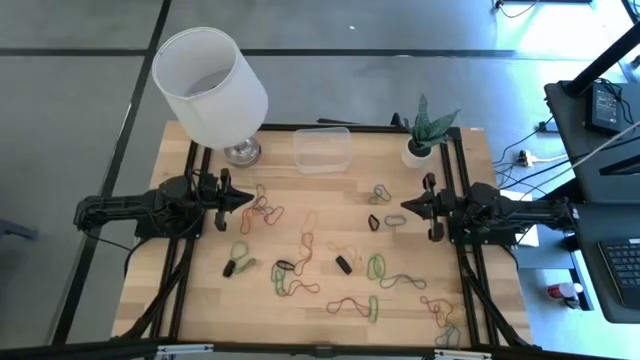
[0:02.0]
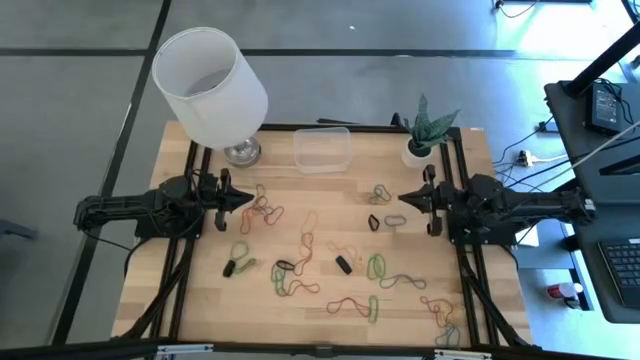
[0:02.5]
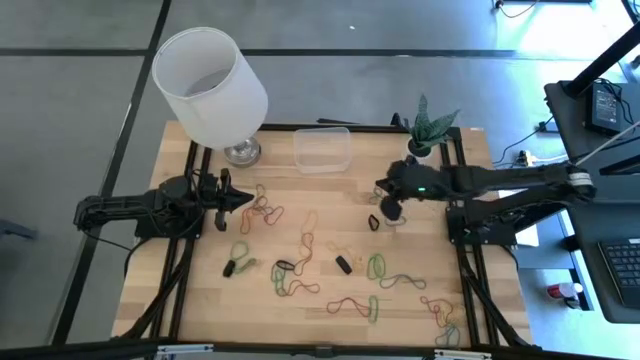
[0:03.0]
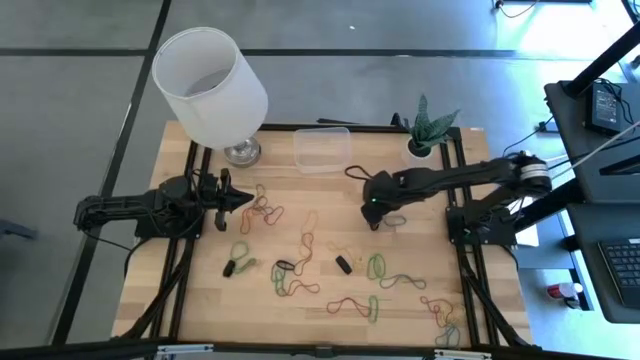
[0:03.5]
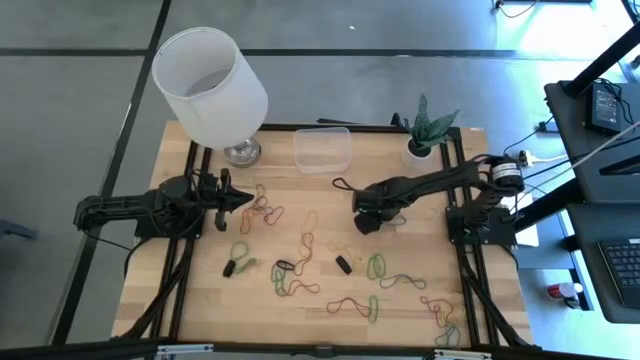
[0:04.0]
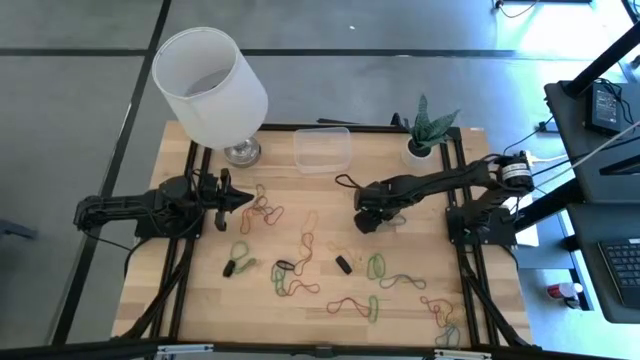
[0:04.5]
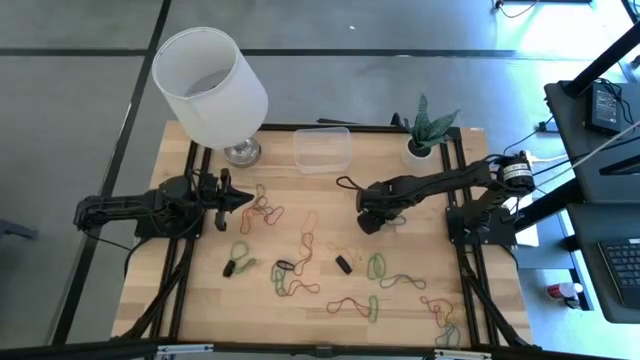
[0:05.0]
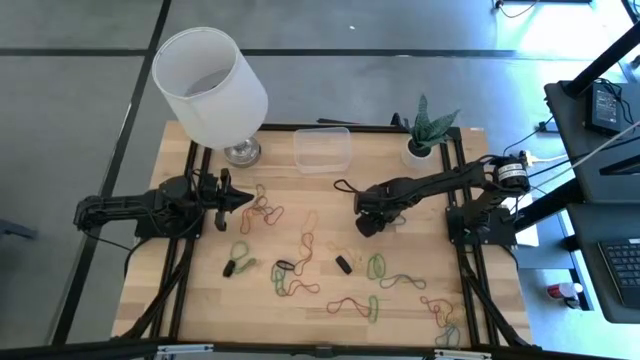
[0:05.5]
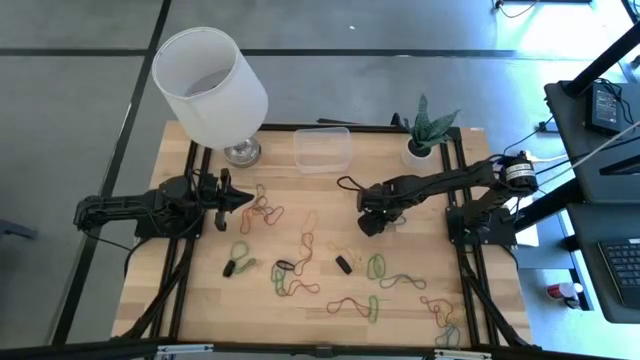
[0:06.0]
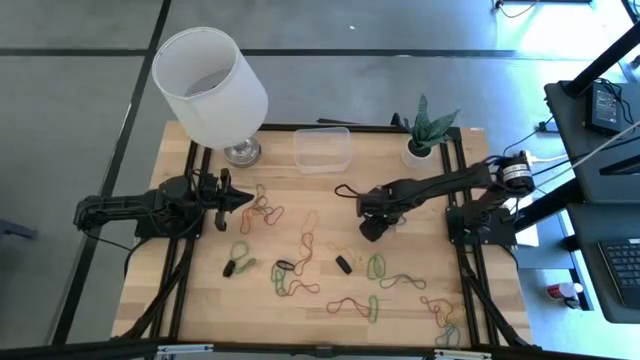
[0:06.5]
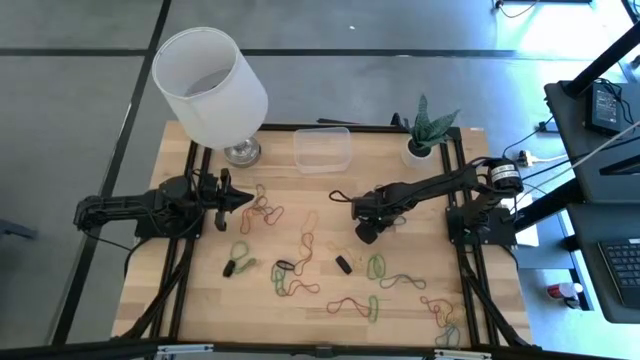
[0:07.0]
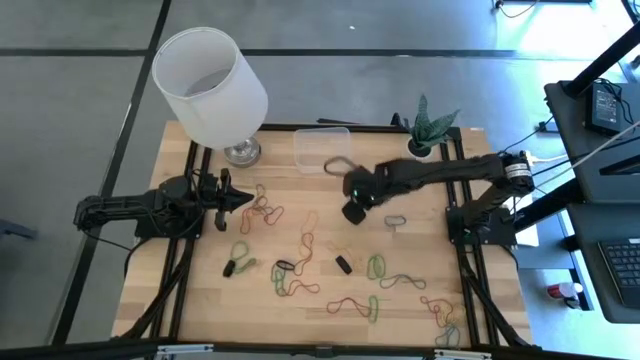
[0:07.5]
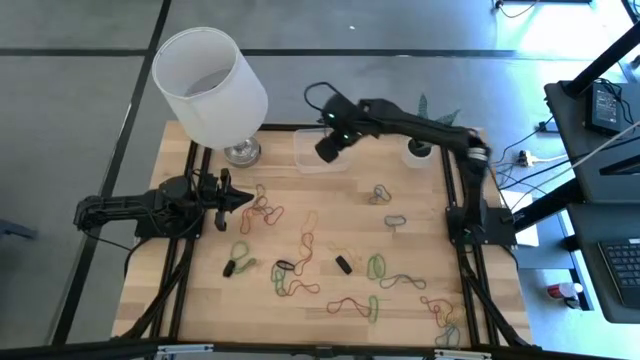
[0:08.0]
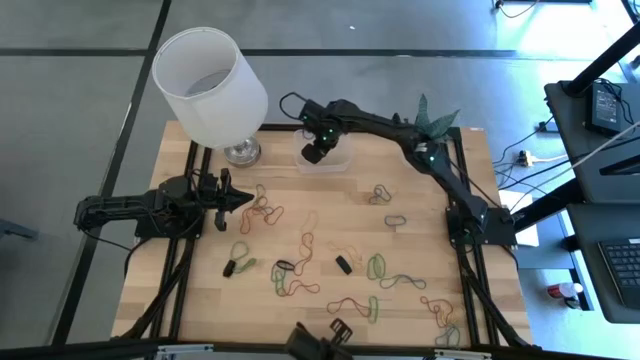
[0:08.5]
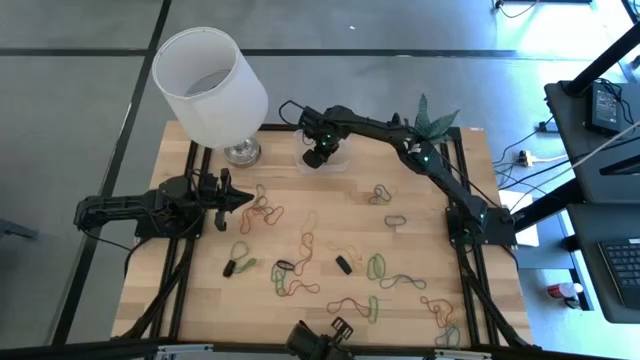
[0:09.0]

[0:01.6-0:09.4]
Task: Pick and place rubber bands into bin
Put the black rubber band into the transparent bin

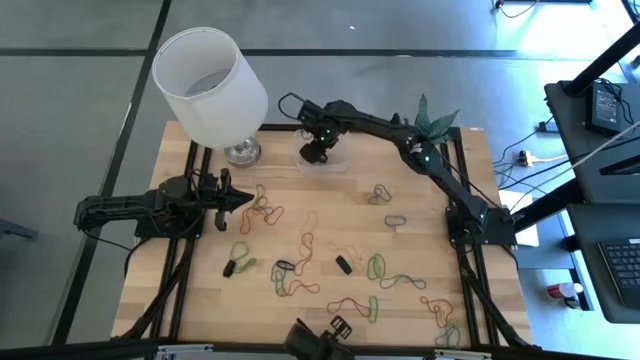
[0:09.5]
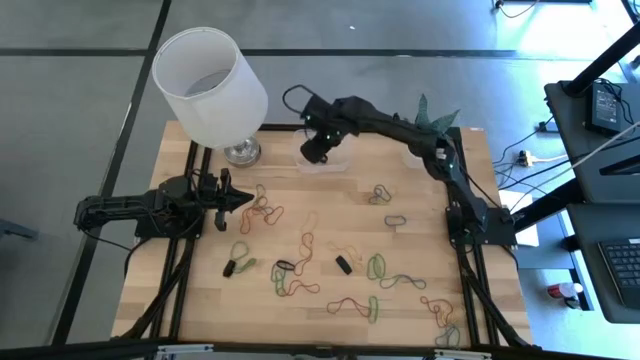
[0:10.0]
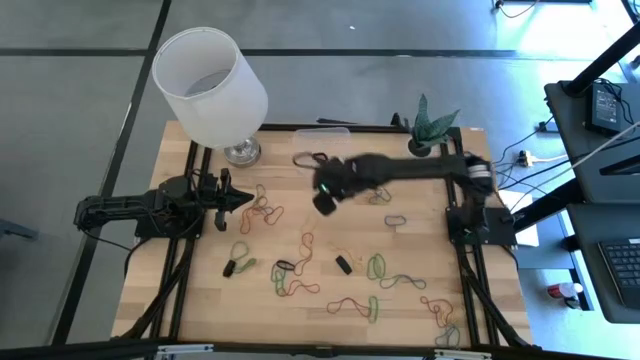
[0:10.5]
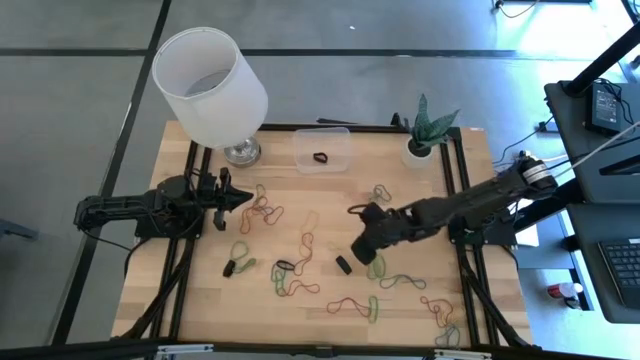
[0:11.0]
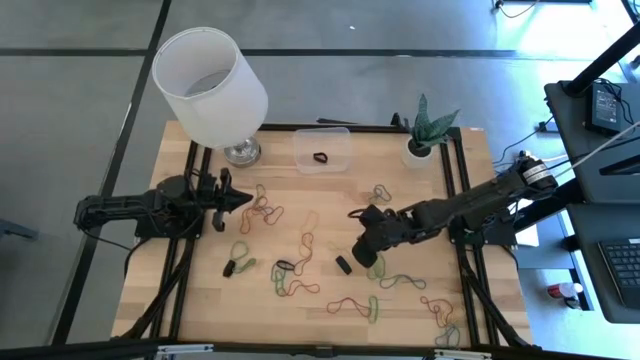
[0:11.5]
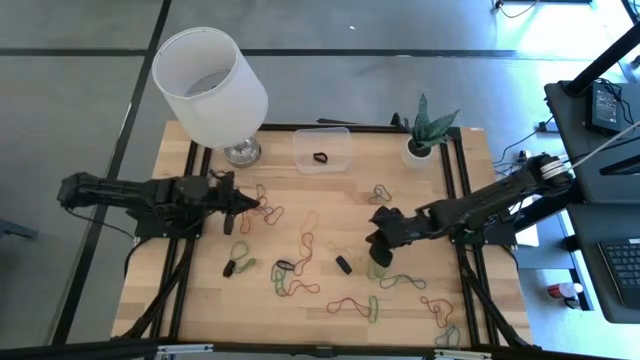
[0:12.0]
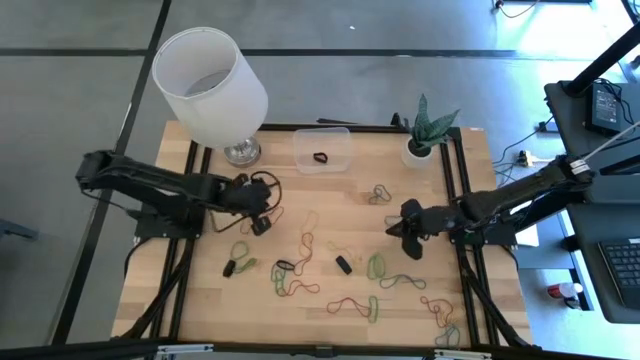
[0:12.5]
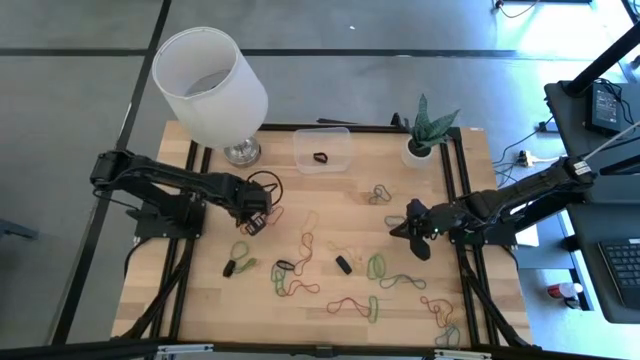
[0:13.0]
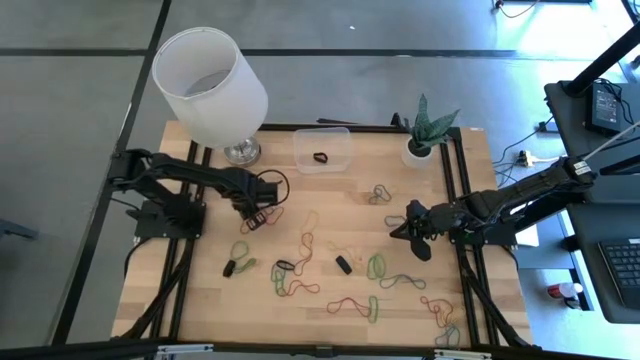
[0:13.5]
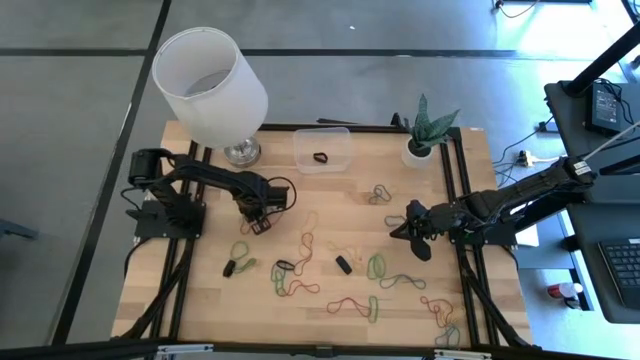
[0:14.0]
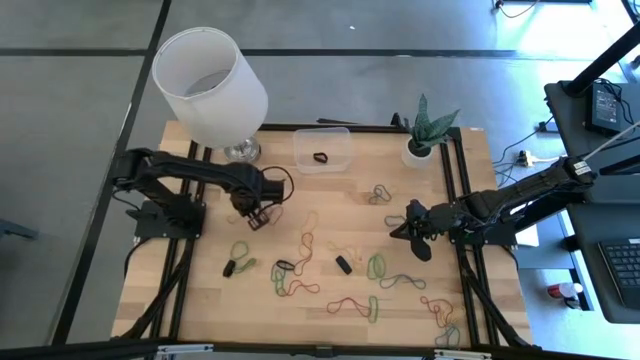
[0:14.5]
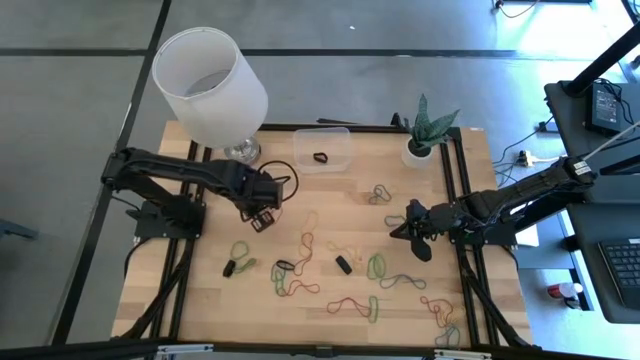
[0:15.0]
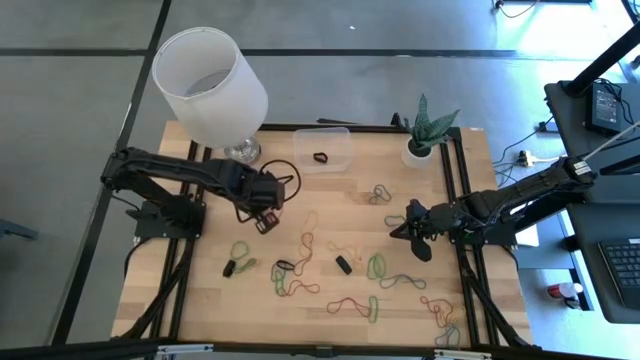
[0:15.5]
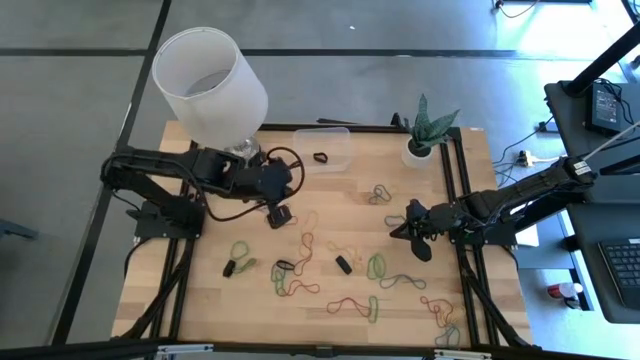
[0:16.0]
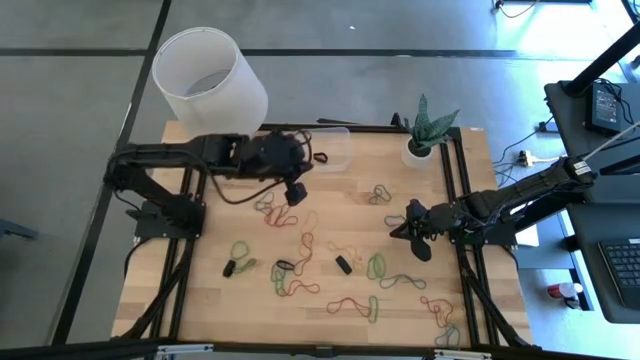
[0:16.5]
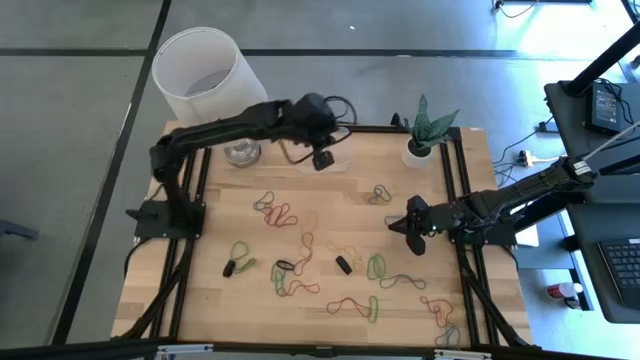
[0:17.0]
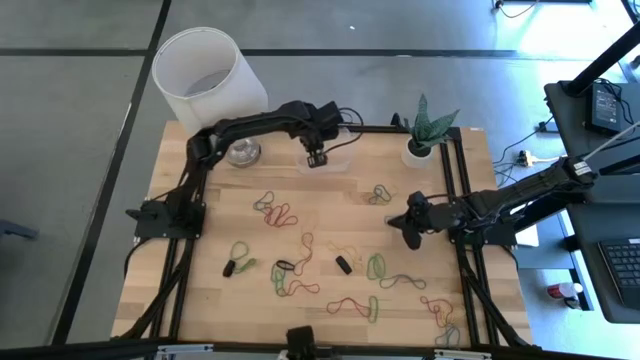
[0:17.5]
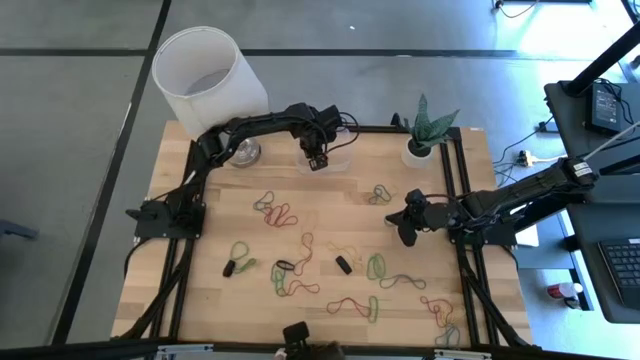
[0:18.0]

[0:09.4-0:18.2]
Put the yellow rubber band into the transparent bin

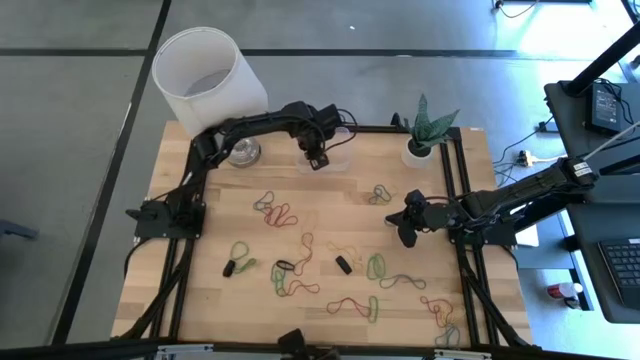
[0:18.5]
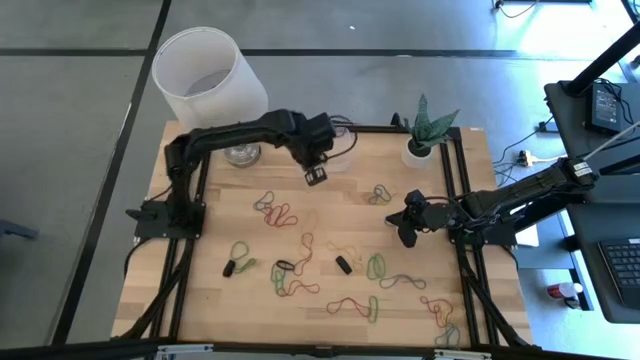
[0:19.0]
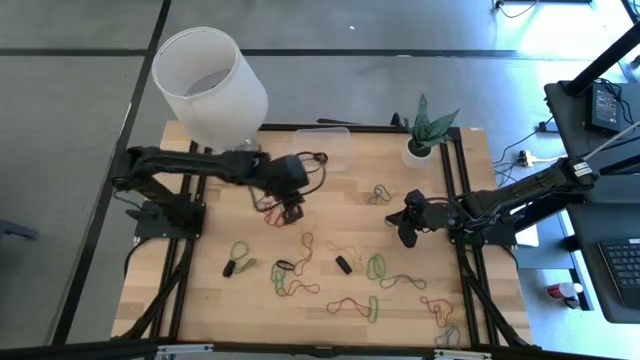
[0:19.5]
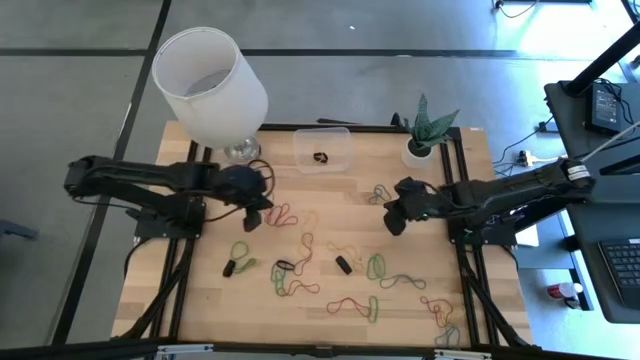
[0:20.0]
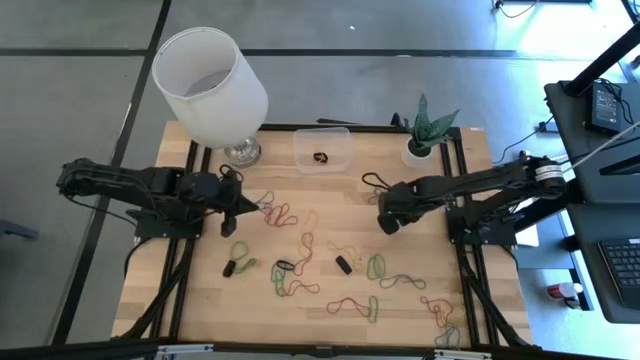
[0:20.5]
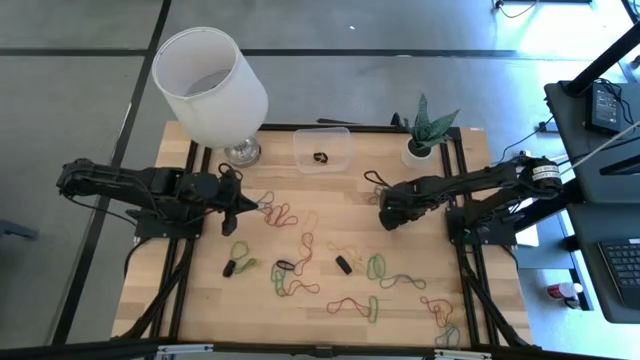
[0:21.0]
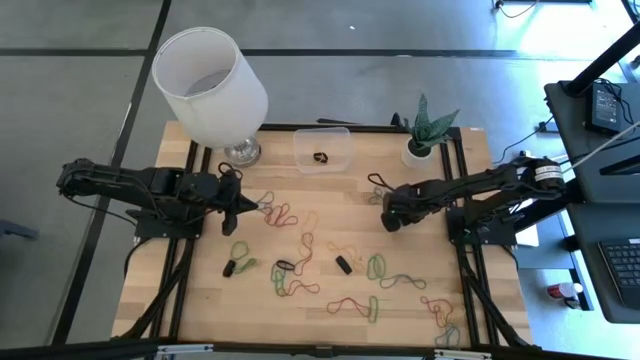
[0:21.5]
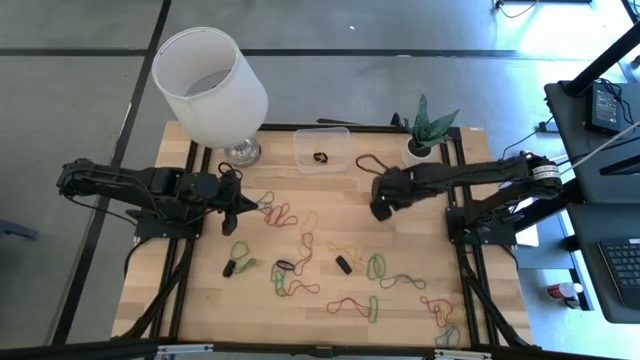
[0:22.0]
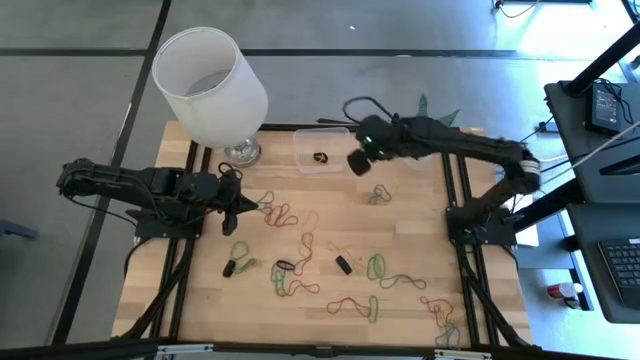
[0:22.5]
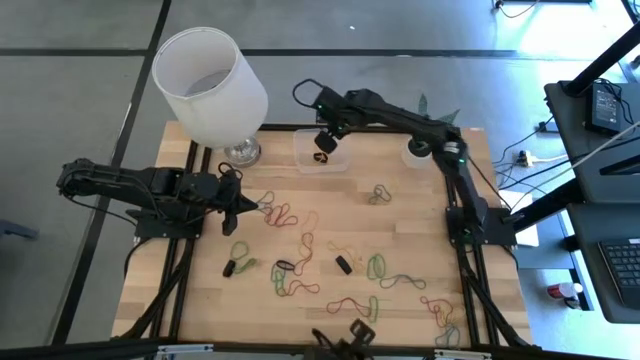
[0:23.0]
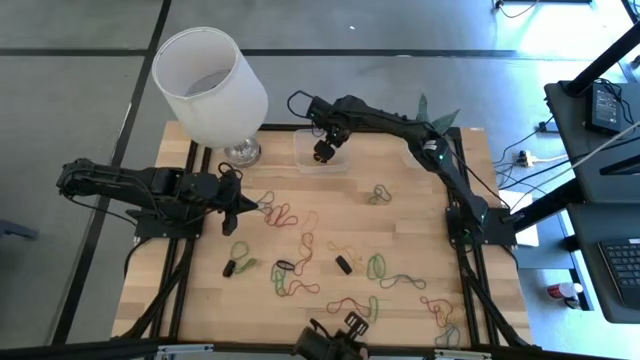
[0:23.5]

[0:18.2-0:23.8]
Put the blue rubber band into the transparent bin
